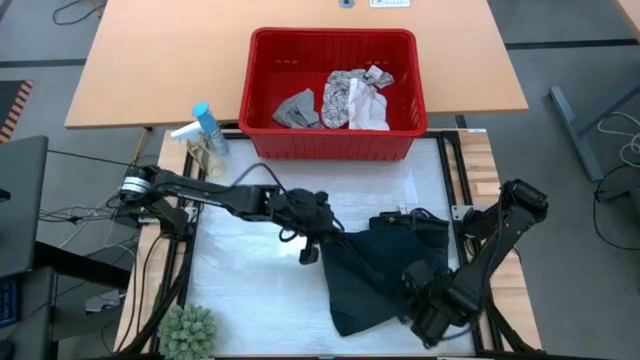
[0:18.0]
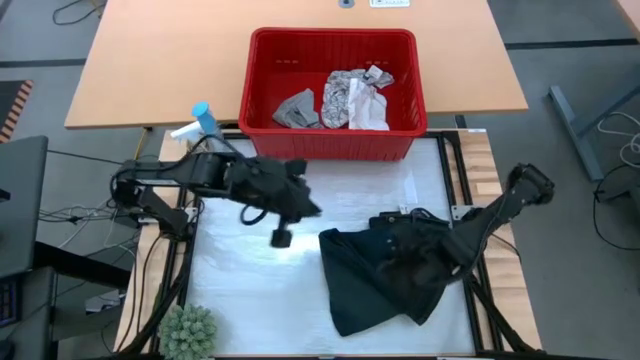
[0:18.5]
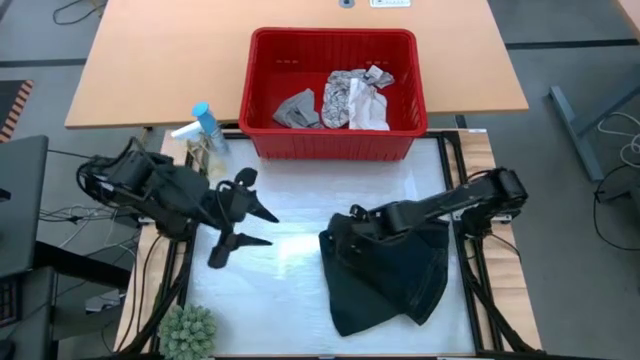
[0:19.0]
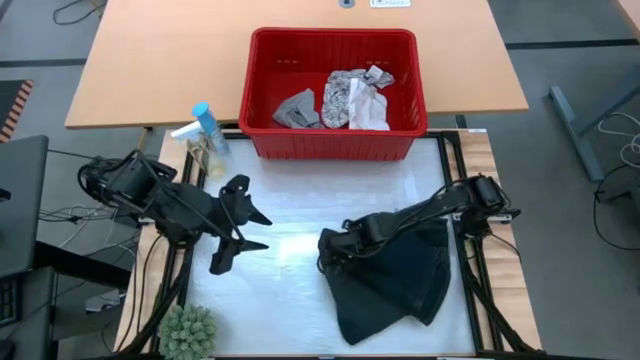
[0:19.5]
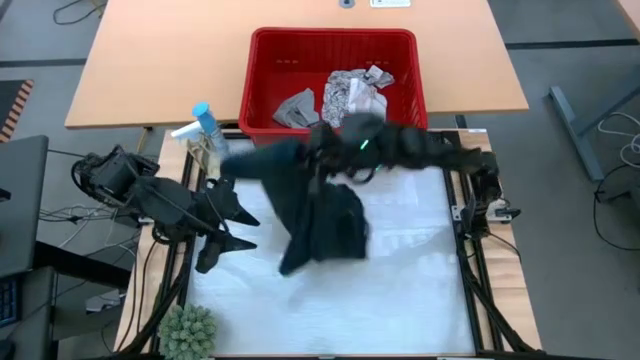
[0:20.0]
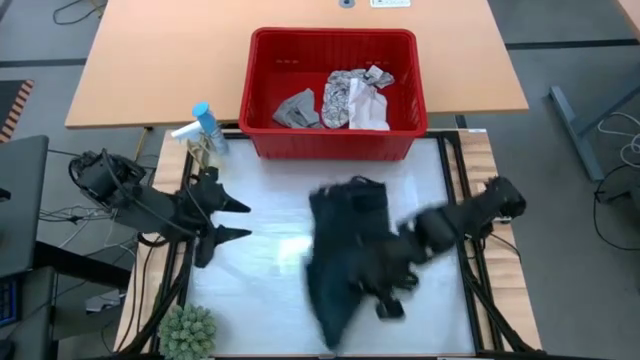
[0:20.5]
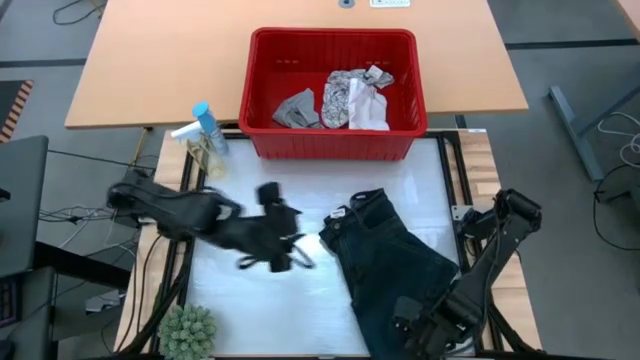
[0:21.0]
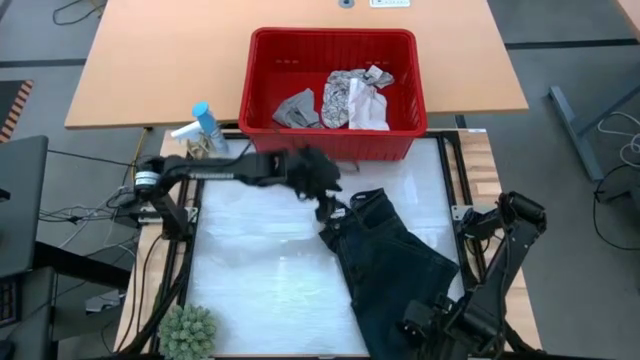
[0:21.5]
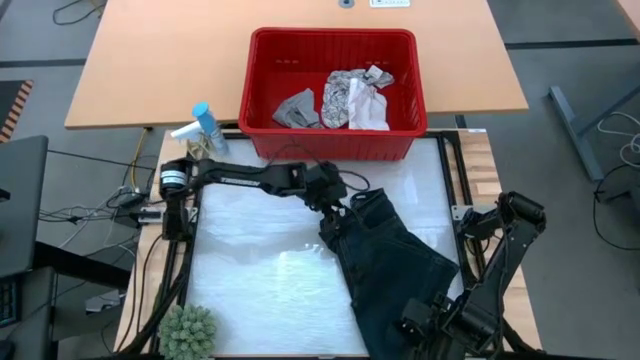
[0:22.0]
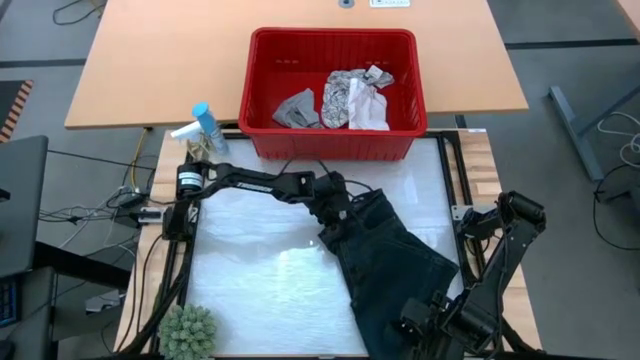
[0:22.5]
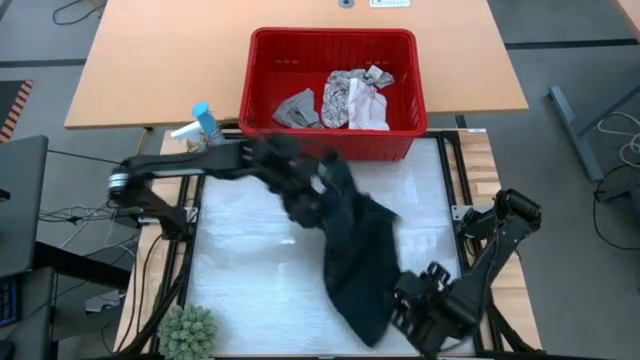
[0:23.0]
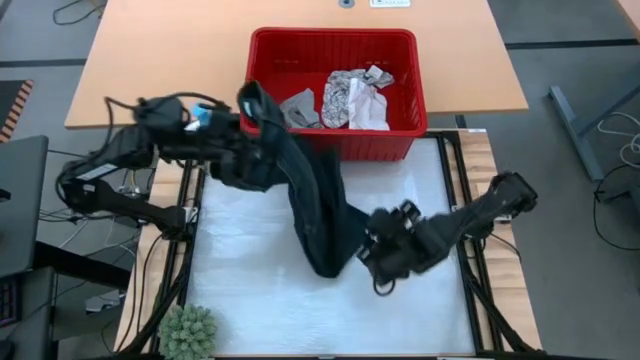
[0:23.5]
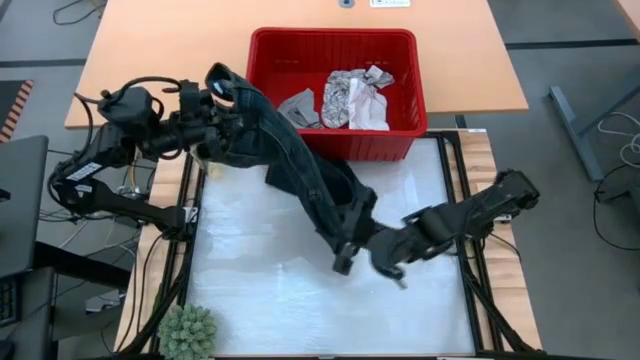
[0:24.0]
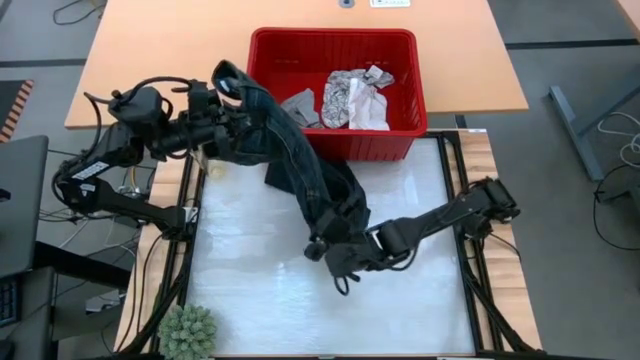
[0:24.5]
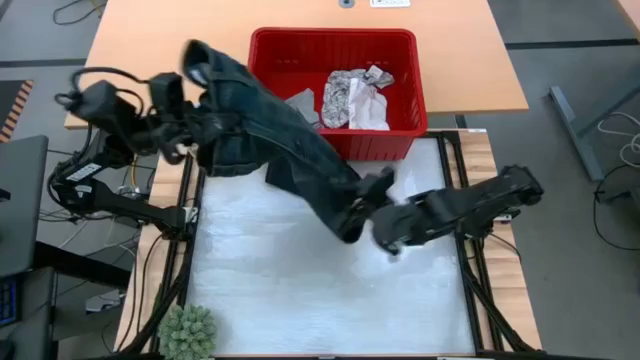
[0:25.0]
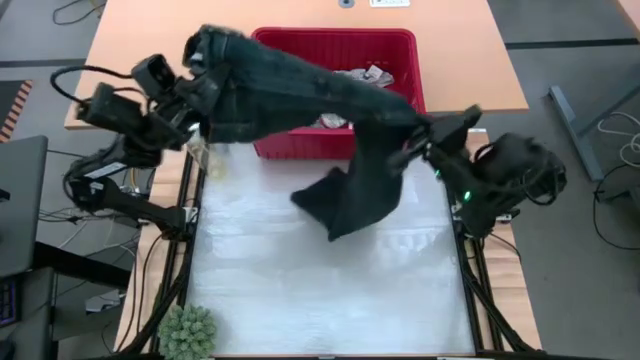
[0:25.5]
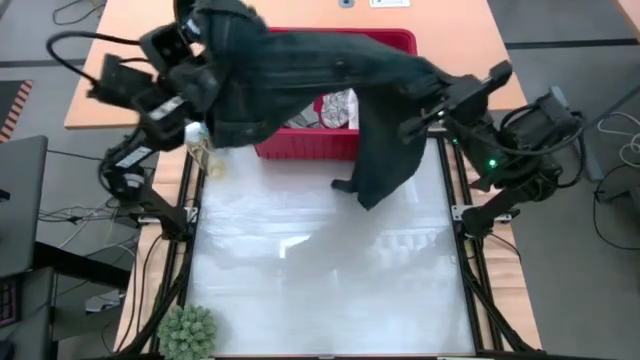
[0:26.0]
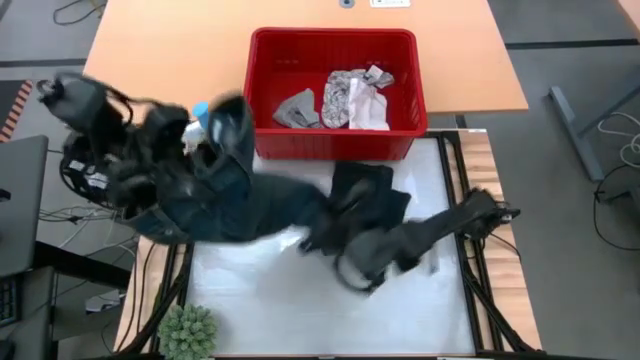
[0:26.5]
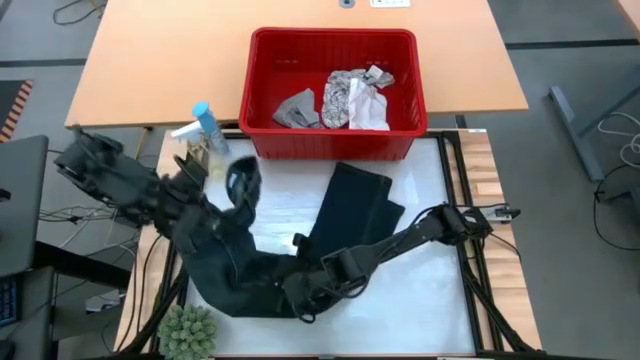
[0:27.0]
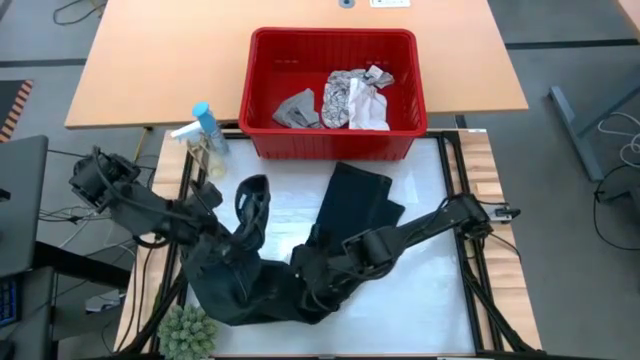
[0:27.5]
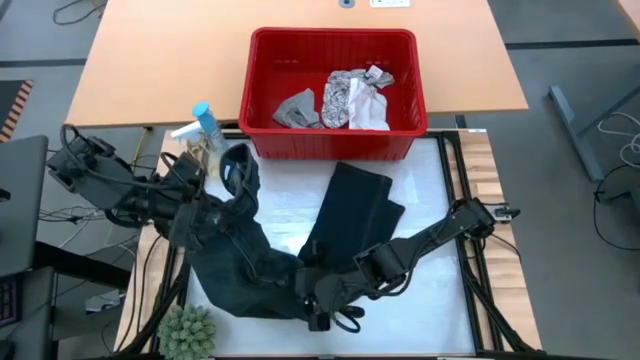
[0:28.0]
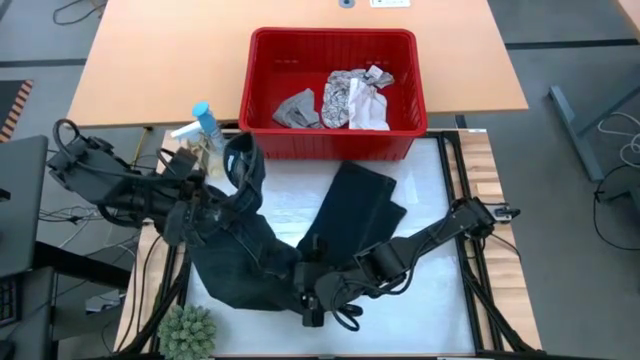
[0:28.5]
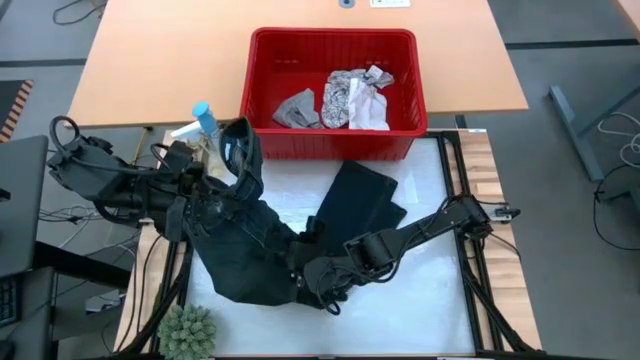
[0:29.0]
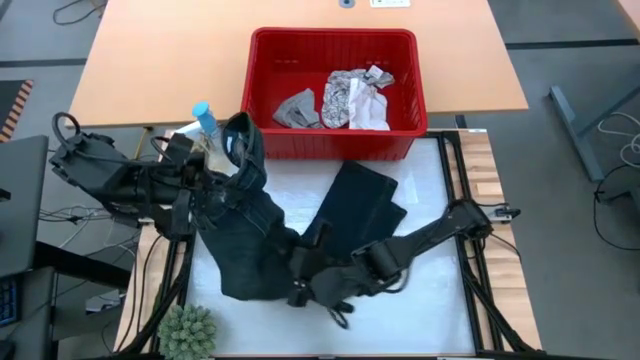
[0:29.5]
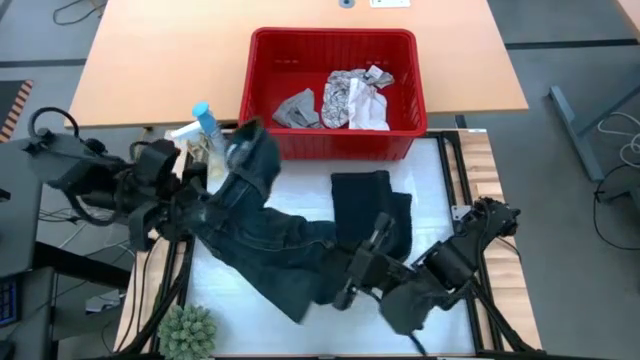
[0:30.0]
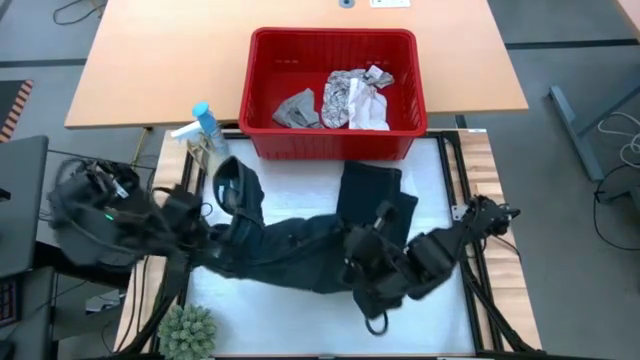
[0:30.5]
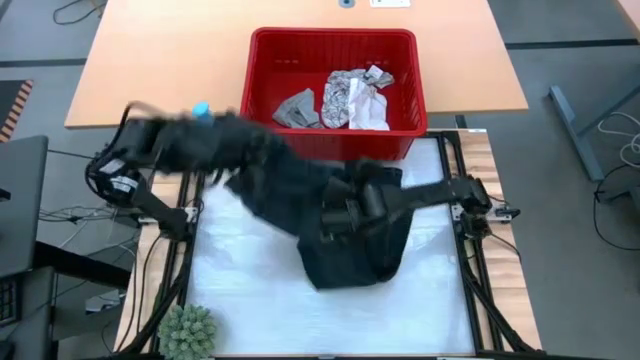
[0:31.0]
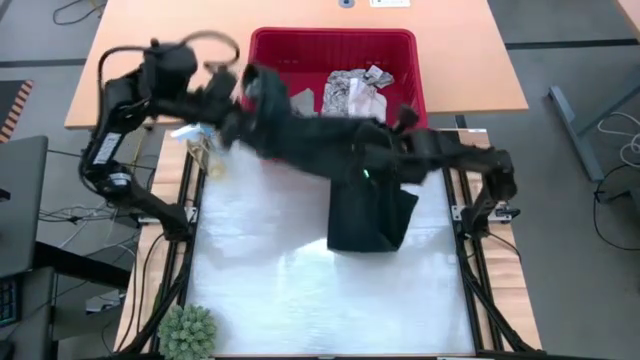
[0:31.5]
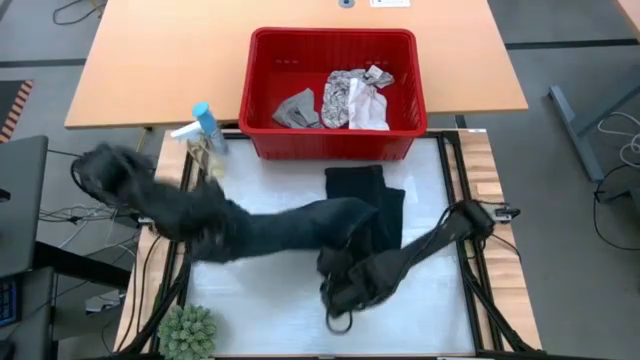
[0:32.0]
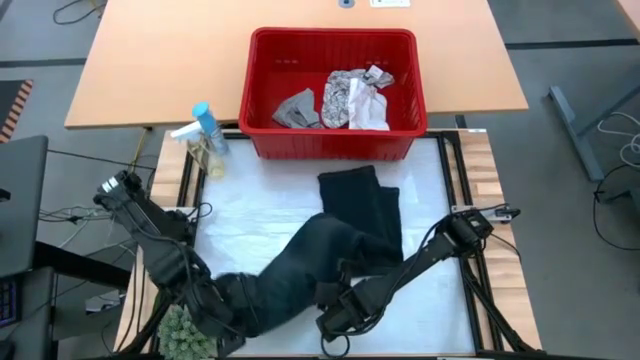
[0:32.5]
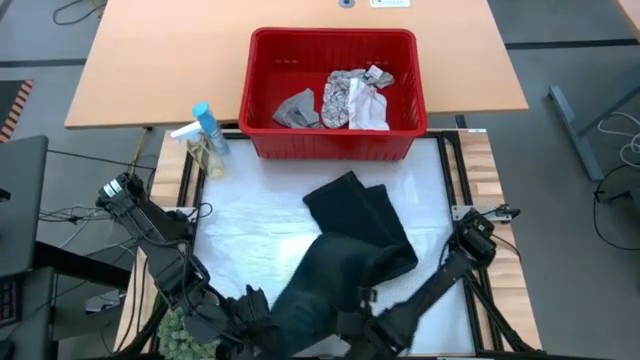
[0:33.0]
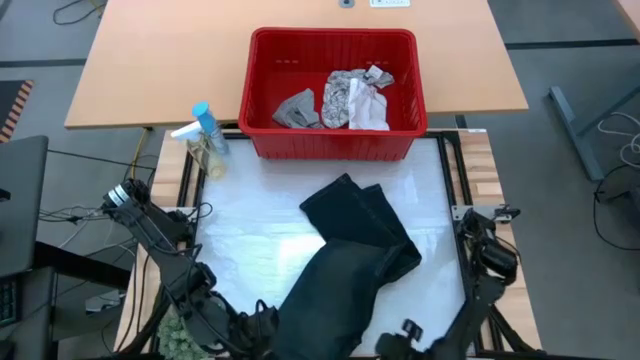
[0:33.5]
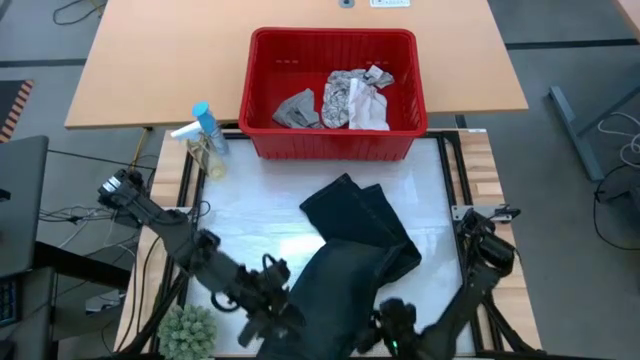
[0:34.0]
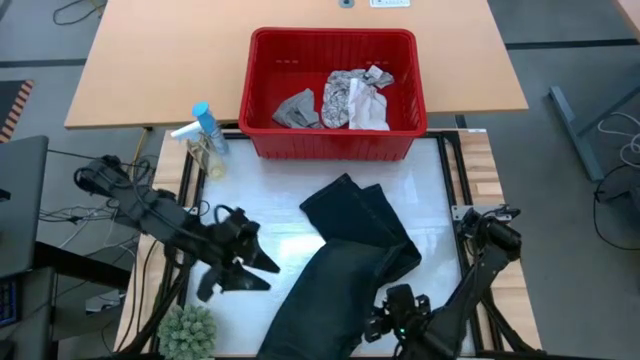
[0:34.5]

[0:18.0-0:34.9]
Task: Fold Laundry from Bin
Fold the blue pants from the red laundry bin

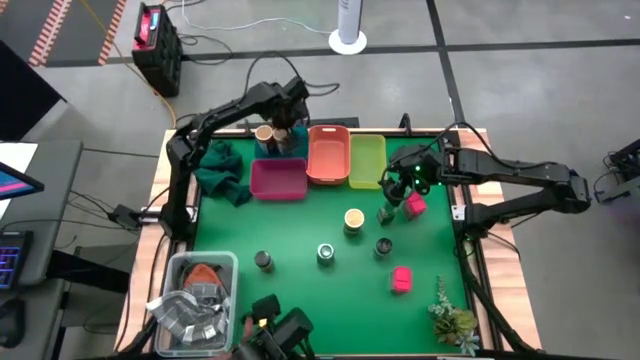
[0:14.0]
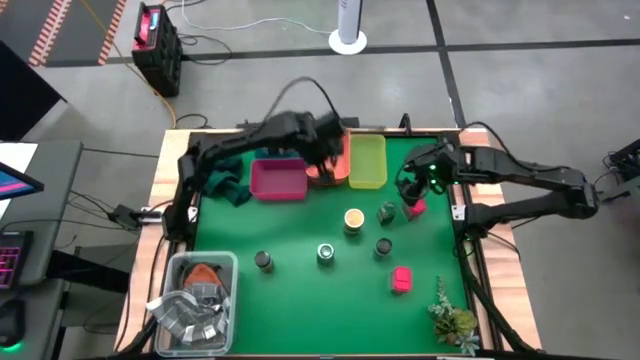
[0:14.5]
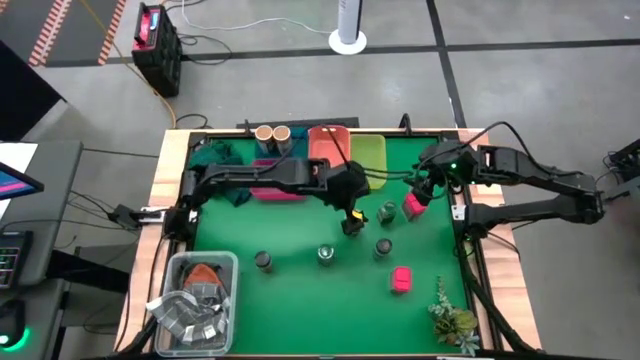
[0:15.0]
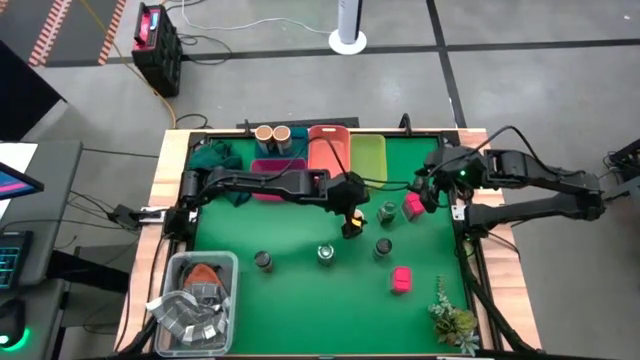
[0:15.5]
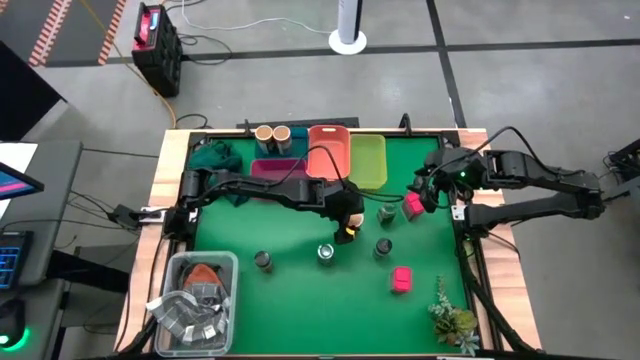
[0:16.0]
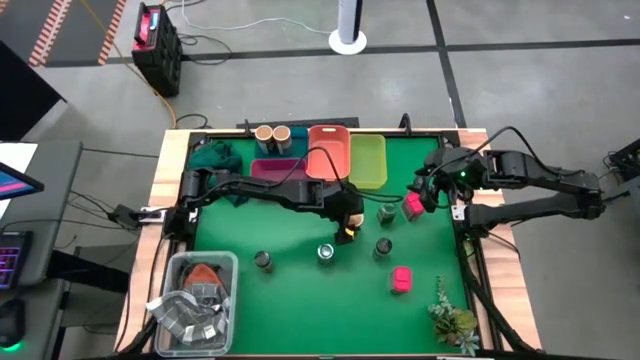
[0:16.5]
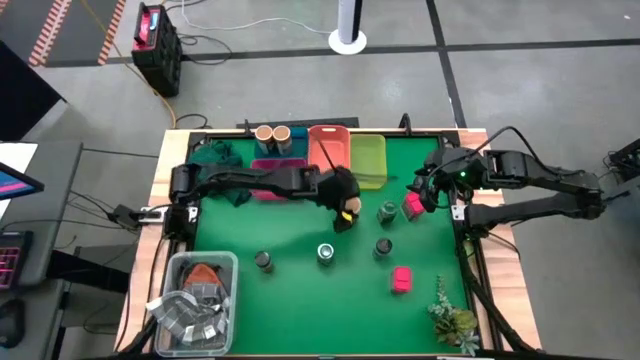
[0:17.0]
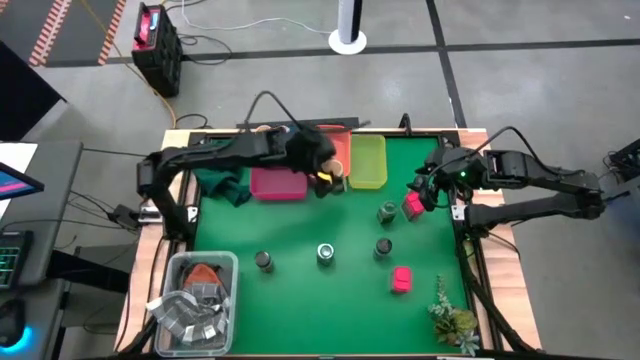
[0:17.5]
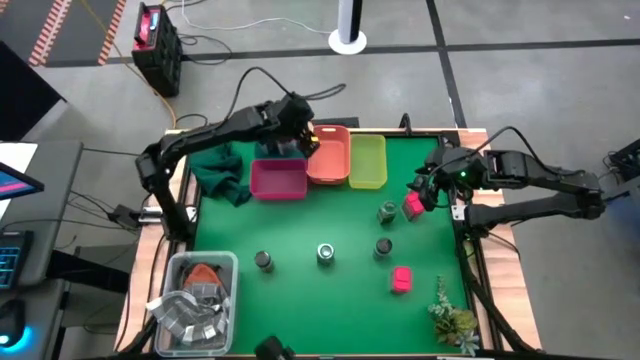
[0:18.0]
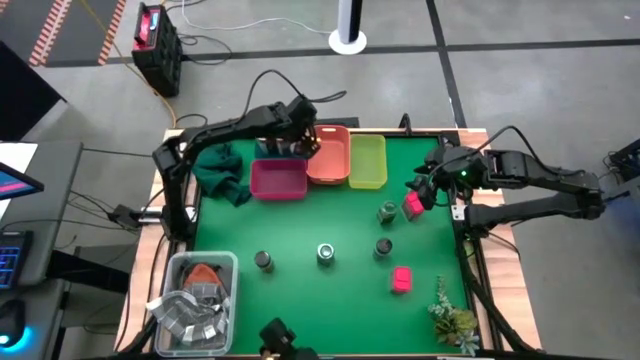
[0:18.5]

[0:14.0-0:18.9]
Task: Sort spices by type
Put the gold seasoning bottle into the blue bin
